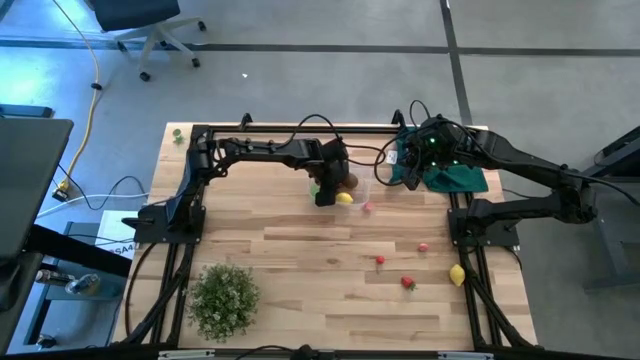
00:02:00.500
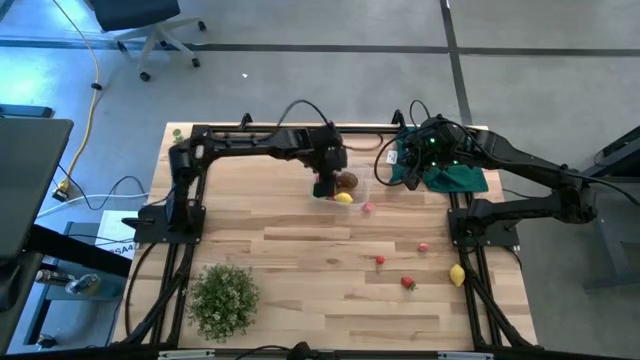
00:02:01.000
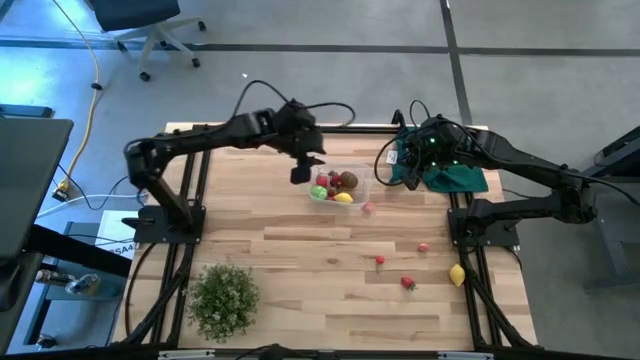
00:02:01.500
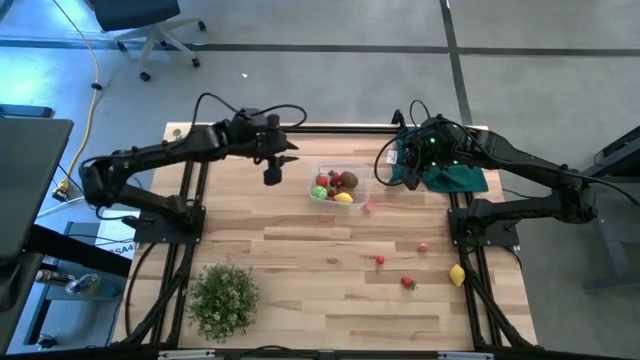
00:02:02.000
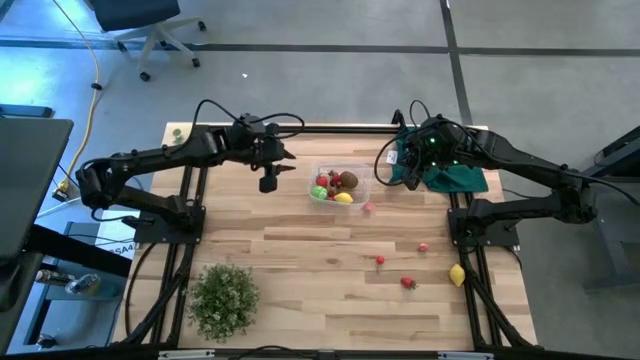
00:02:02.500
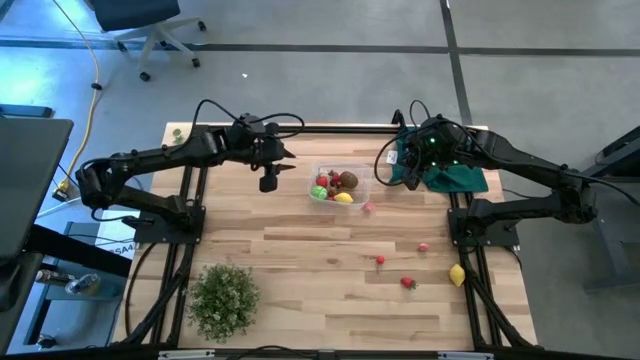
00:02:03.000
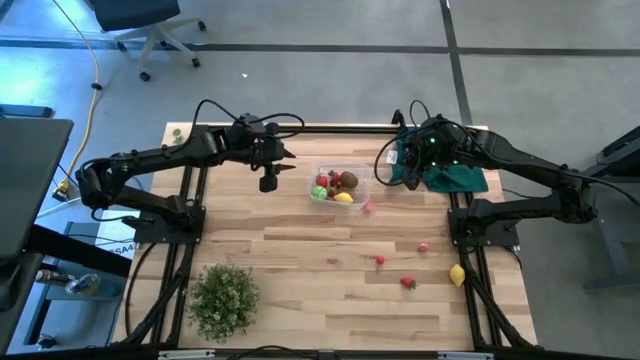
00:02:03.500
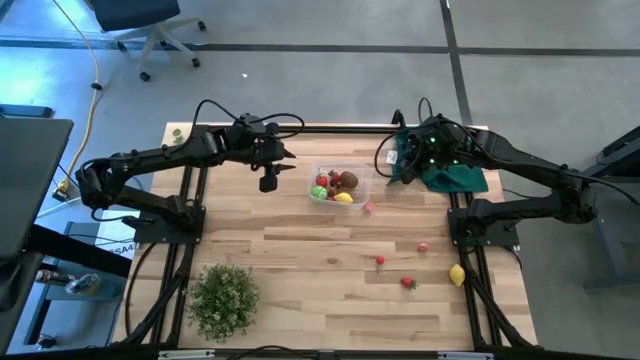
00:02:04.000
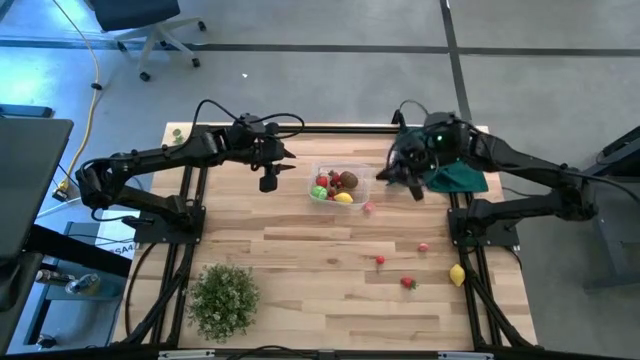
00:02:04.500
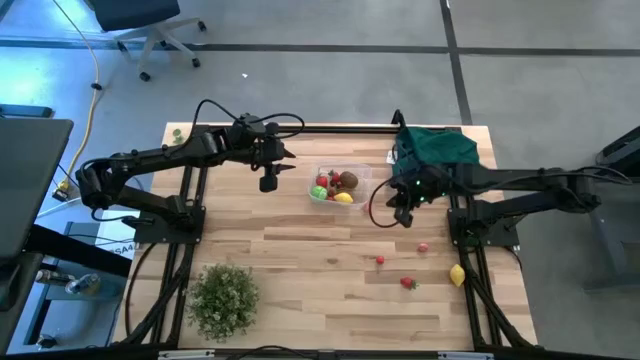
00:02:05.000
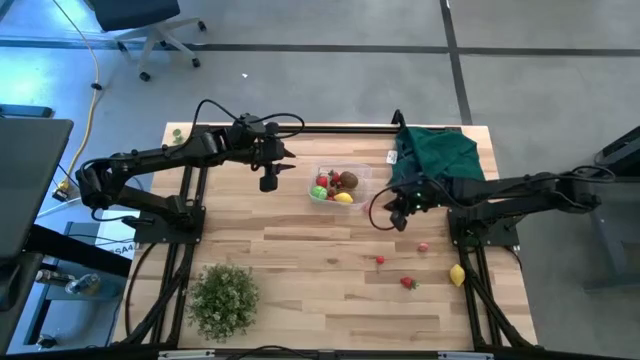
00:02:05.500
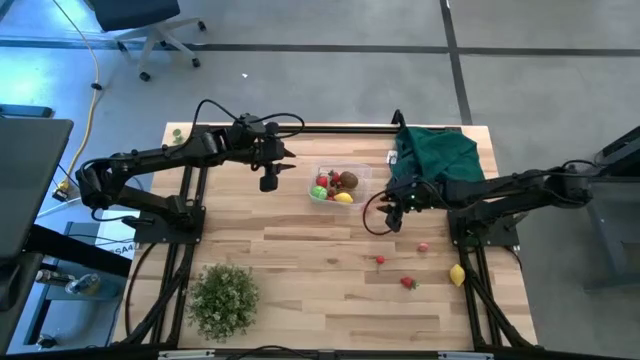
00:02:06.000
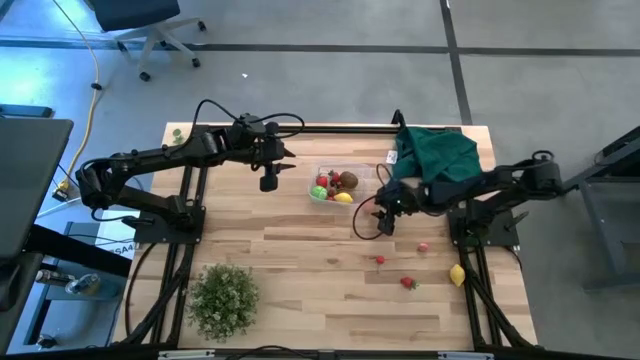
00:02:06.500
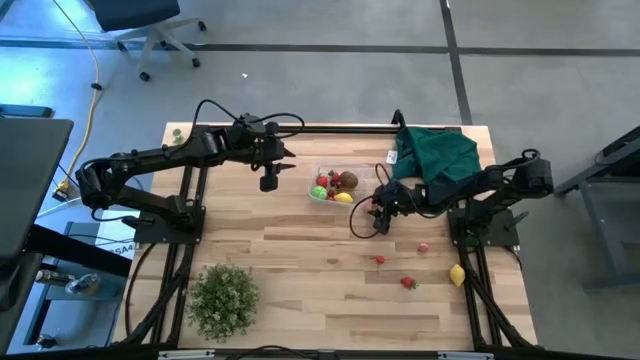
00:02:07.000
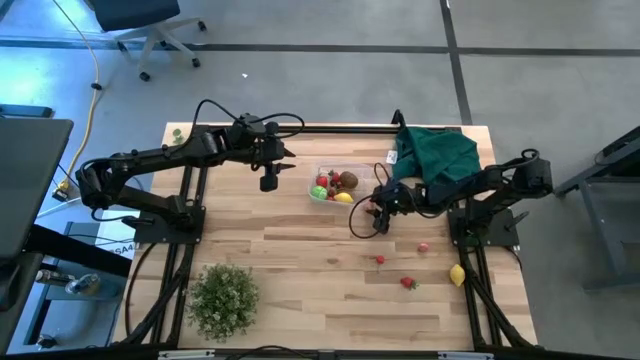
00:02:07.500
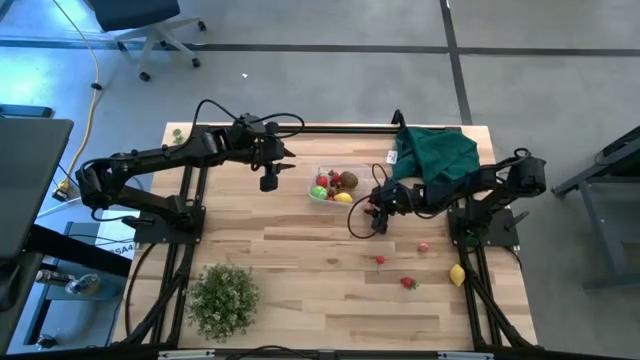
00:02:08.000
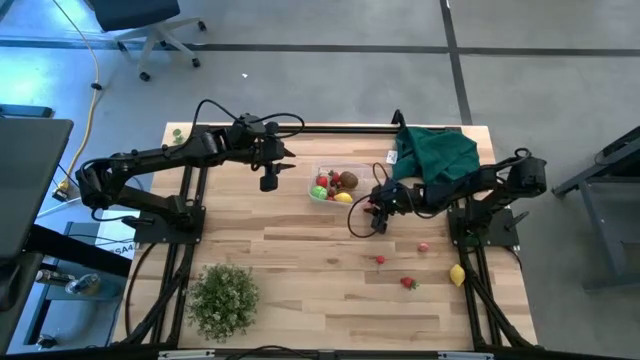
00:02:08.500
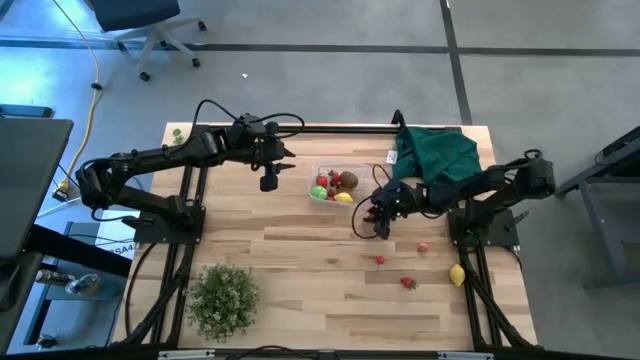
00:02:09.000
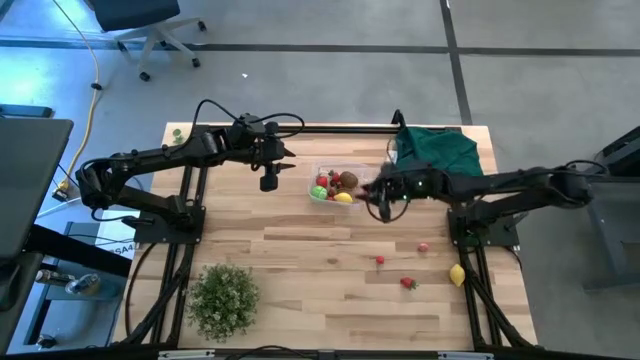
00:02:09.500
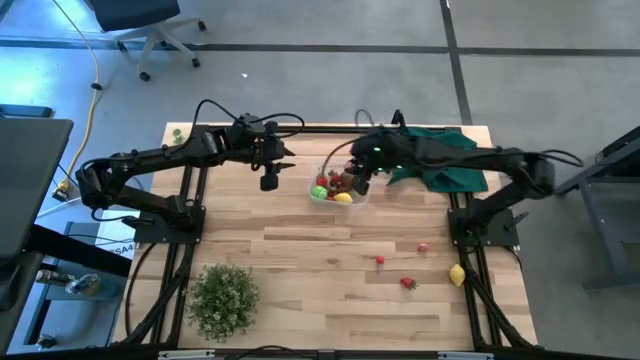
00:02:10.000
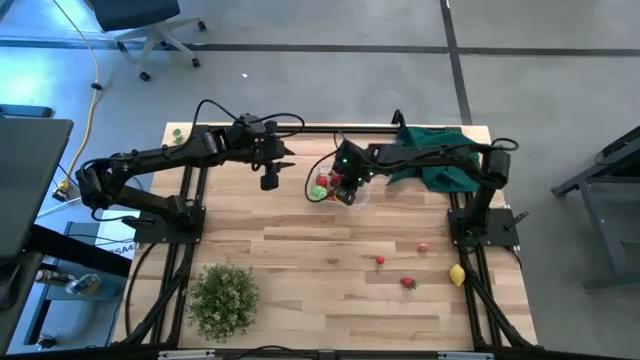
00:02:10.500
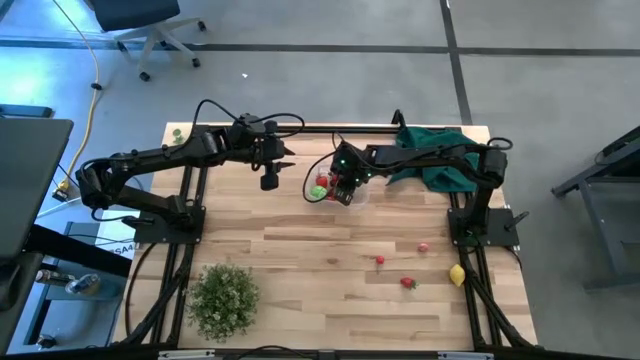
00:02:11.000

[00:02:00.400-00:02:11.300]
Task: Pick and placing Produce into tupperware
Put the pink peach into the transparent bin

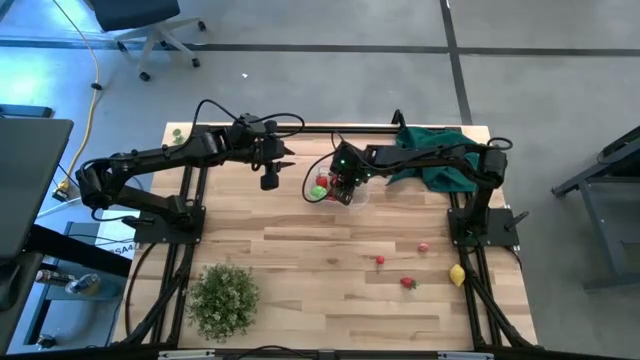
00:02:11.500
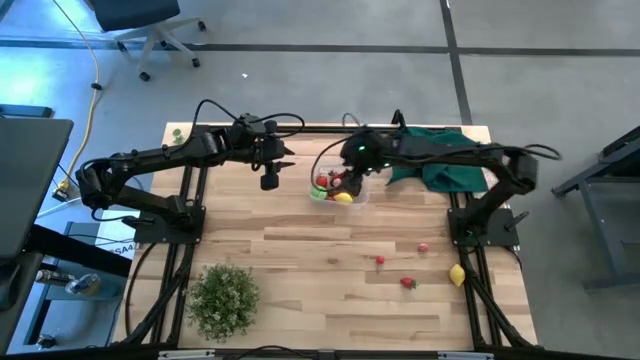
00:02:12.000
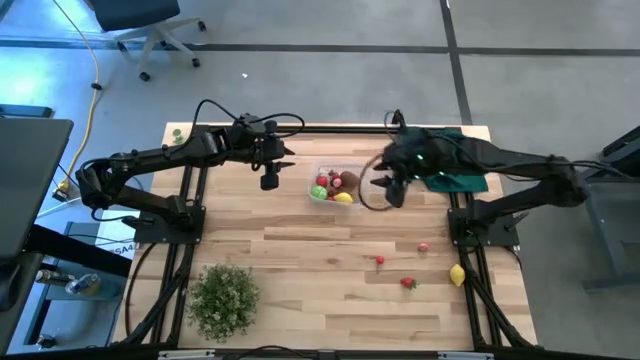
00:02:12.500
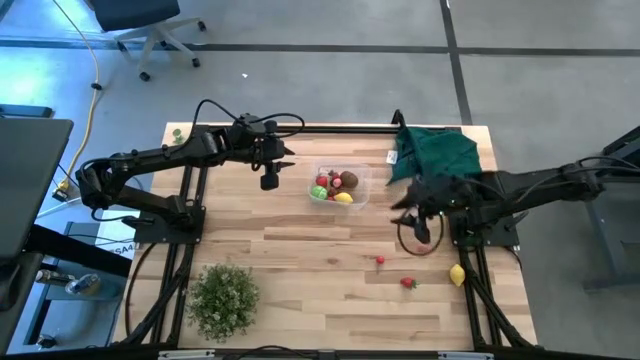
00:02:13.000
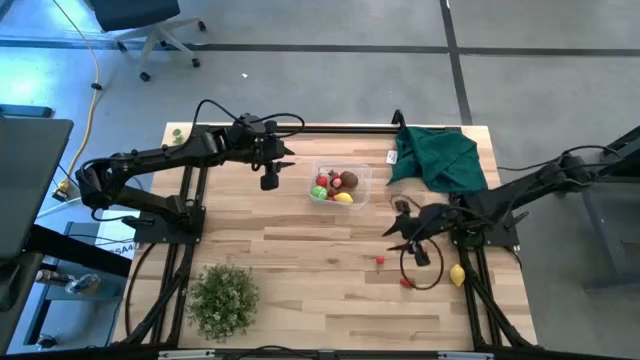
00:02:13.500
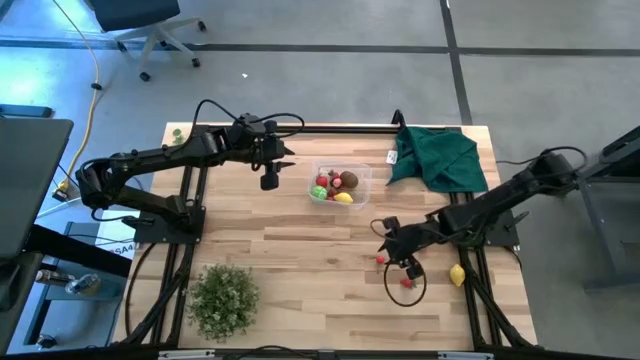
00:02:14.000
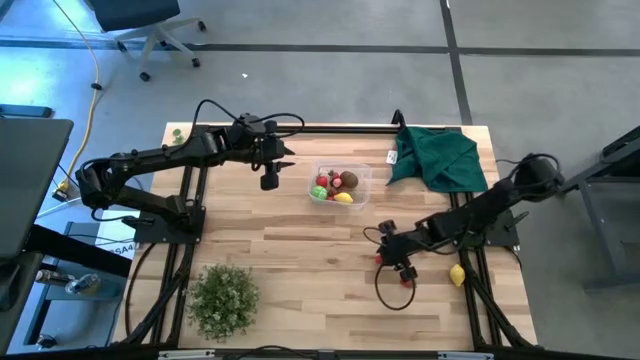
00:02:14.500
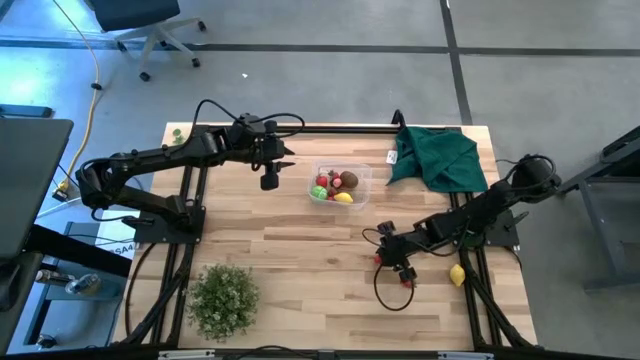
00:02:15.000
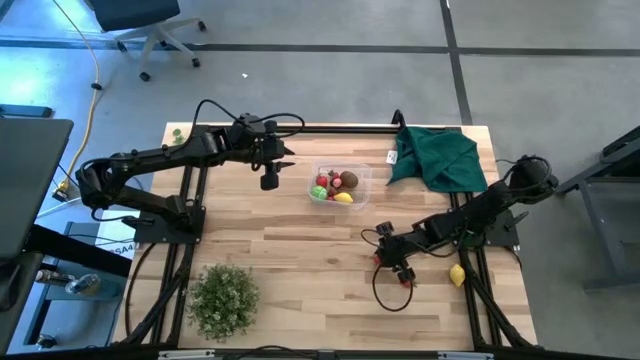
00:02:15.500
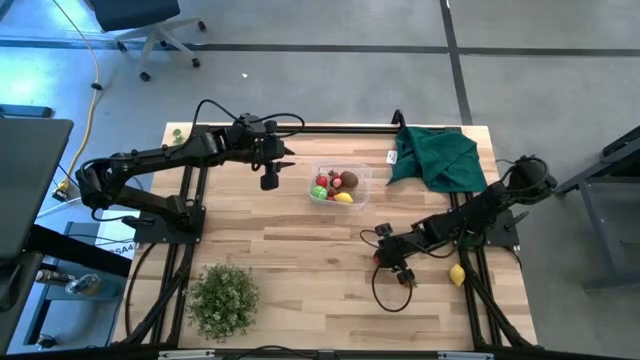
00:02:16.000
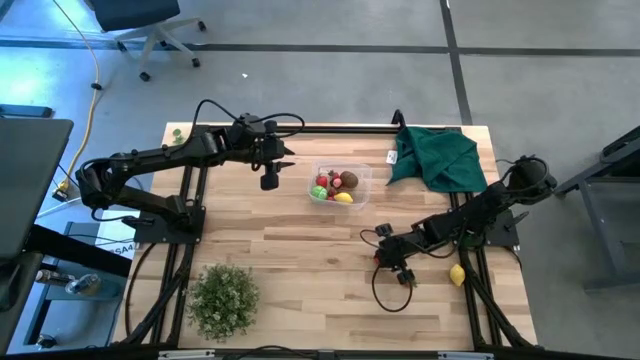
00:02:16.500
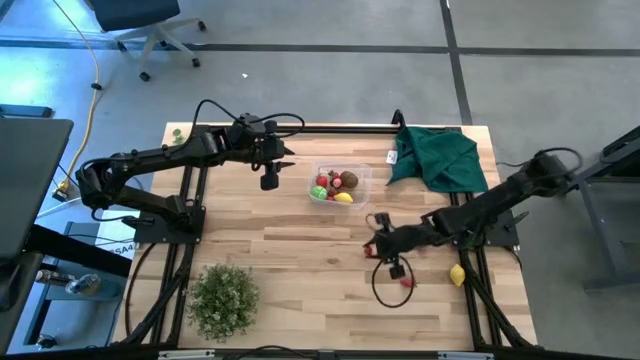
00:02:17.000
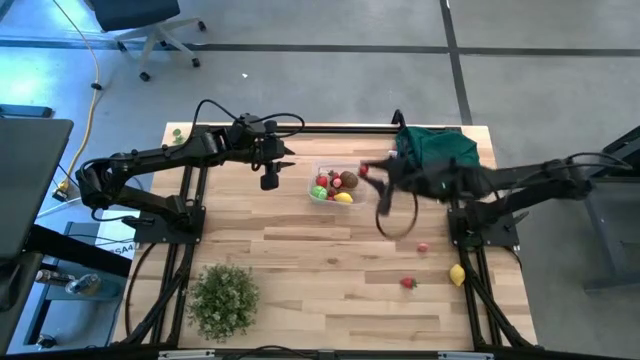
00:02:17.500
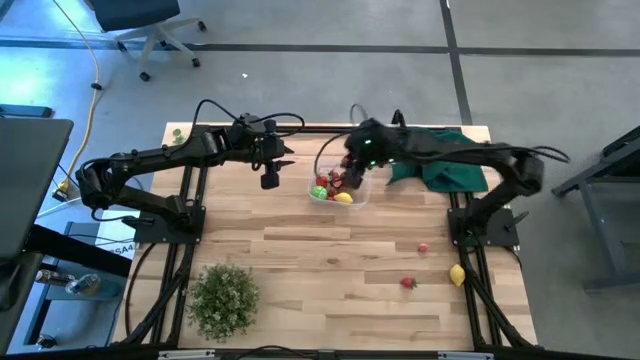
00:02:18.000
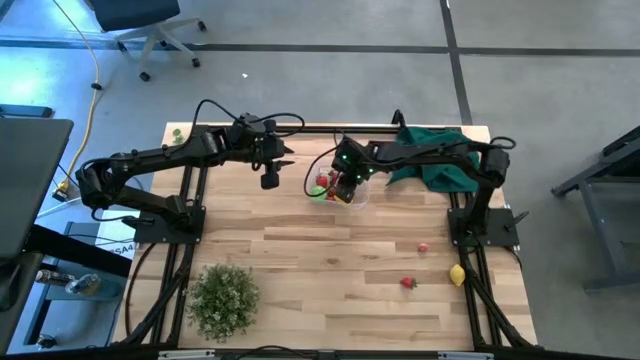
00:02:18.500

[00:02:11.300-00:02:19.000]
Put the red cherry into the transparent bin

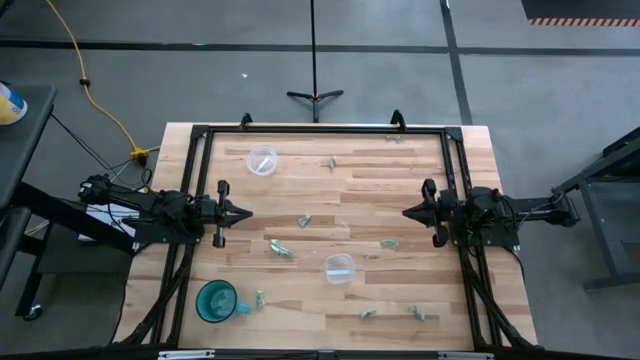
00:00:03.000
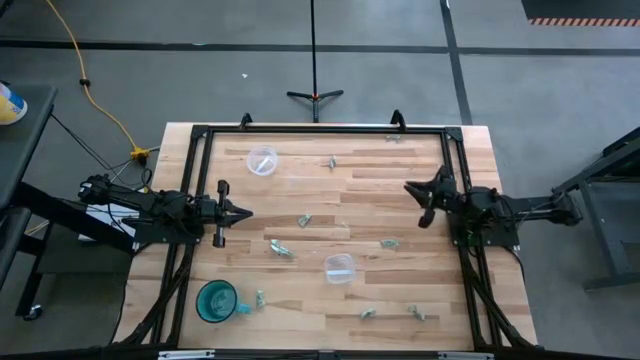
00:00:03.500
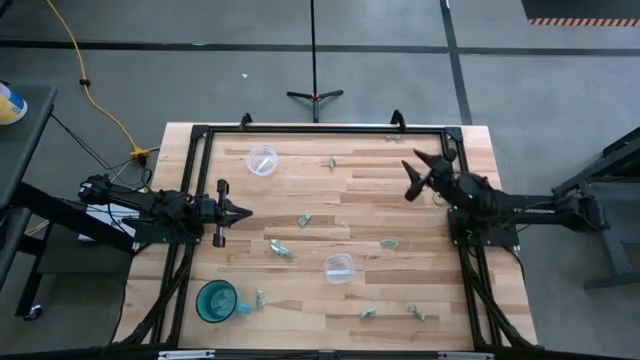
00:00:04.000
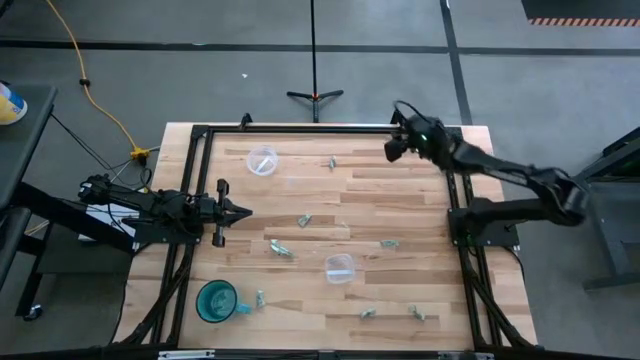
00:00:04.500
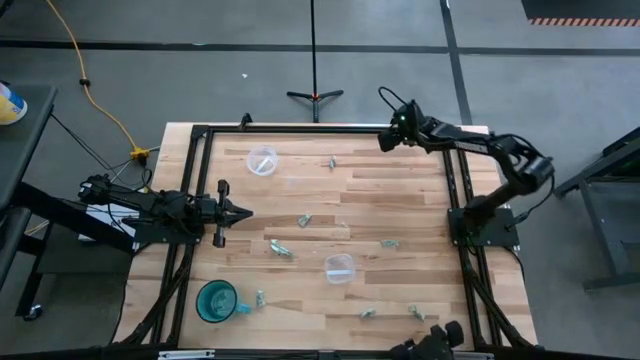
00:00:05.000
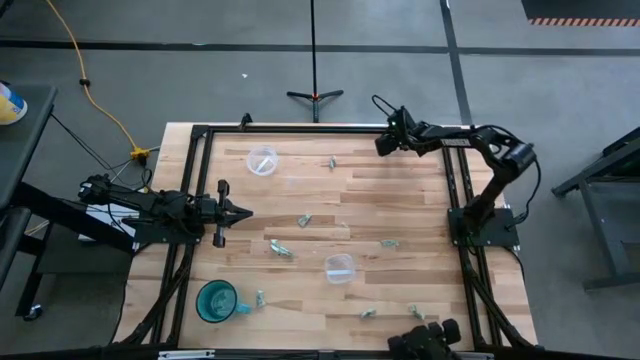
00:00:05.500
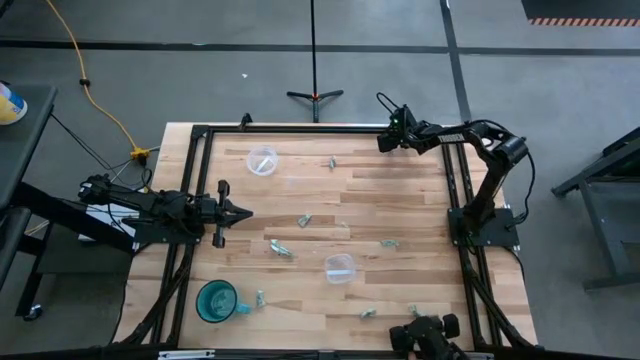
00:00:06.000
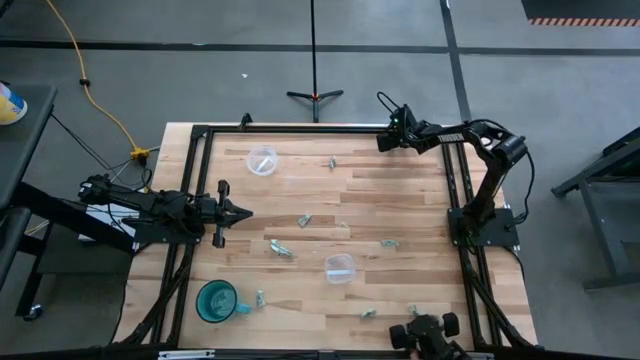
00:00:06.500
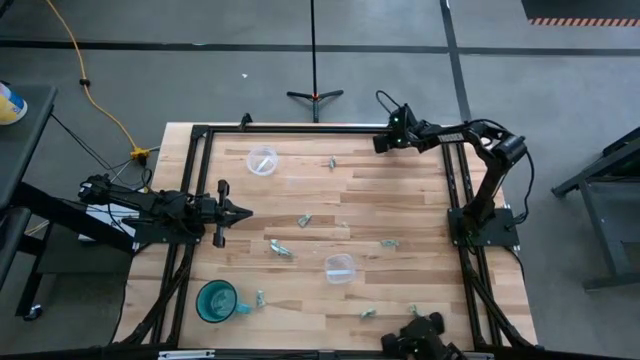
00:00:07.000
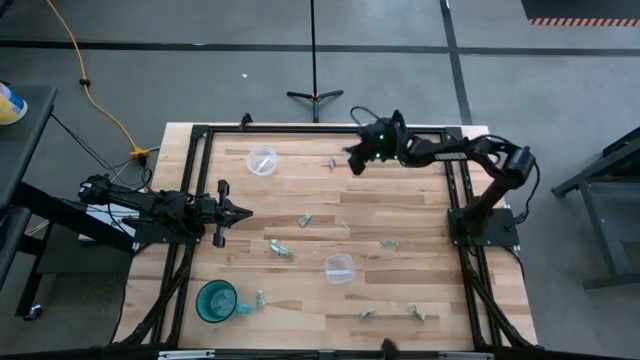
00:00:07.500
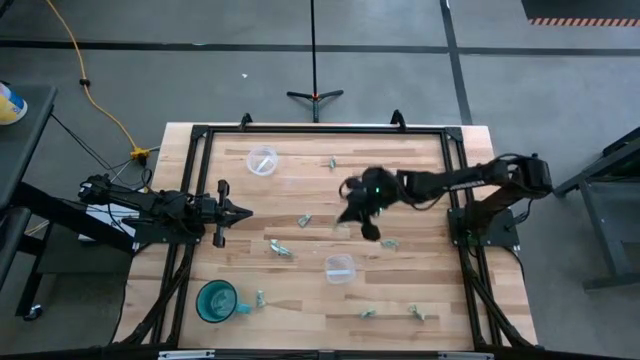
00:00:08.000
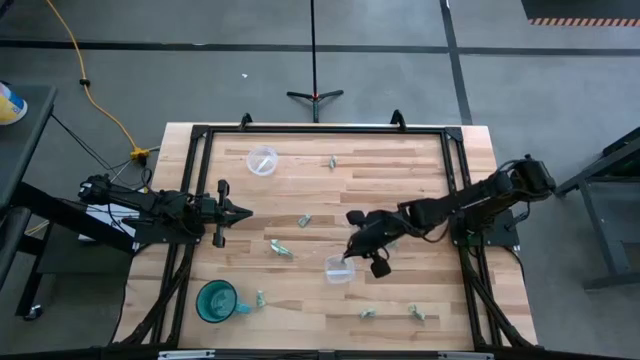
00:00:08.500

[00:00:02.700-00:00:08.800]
Task: Pick and place Stevia / Truvia into bins
Put the stevia packet into the bottom transparent container
